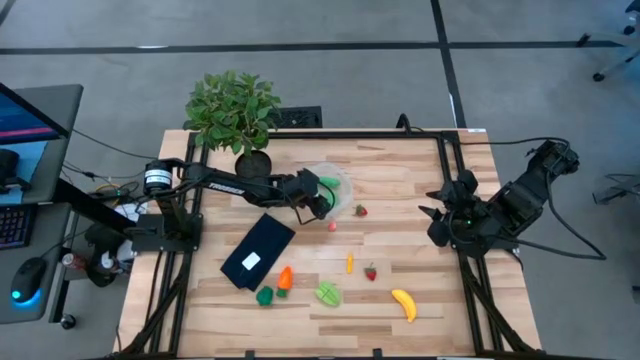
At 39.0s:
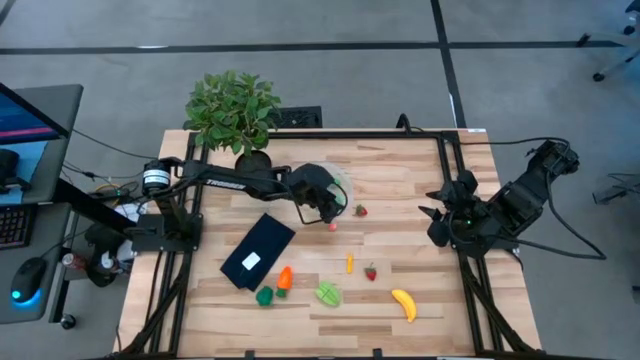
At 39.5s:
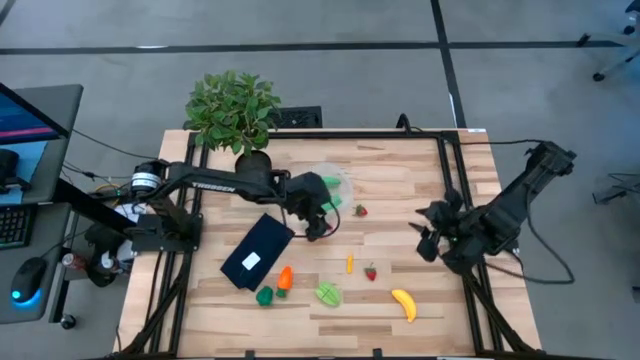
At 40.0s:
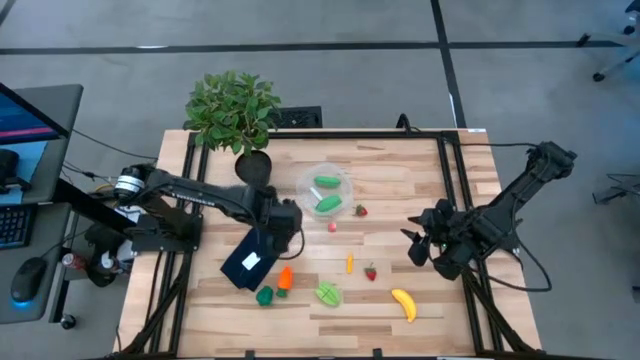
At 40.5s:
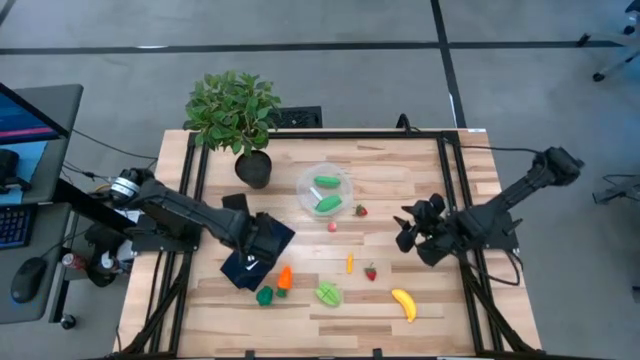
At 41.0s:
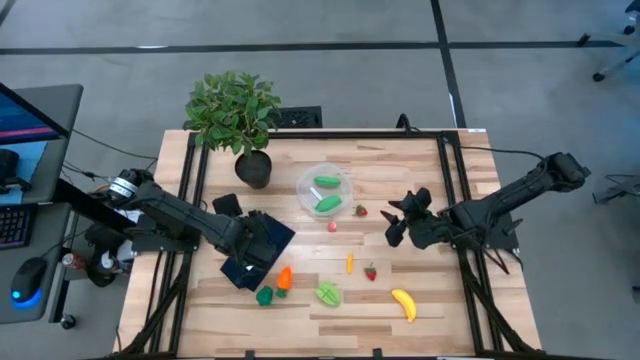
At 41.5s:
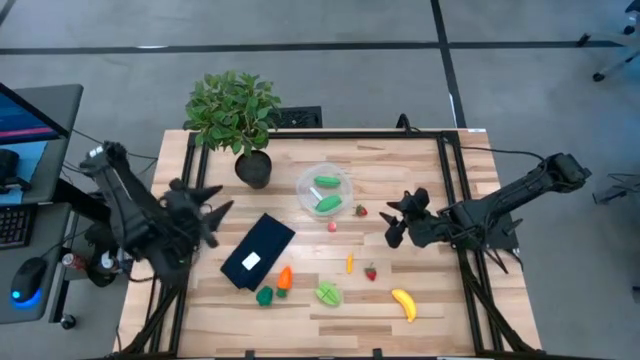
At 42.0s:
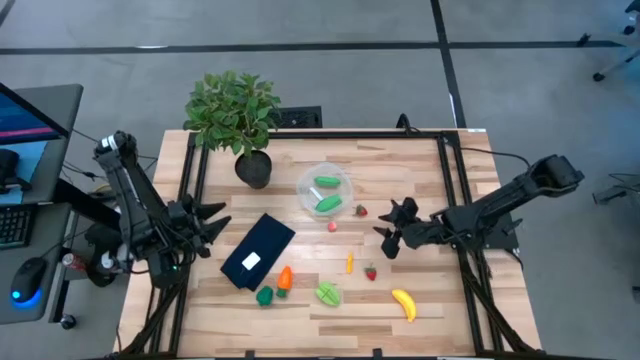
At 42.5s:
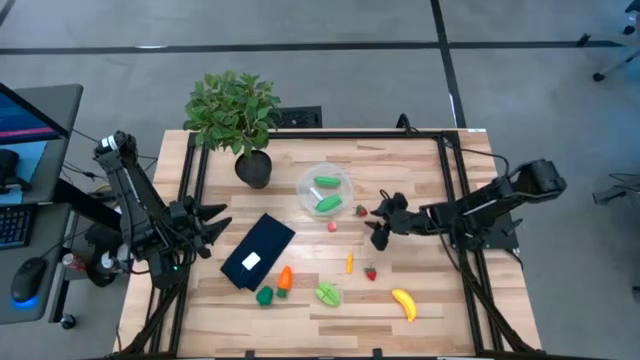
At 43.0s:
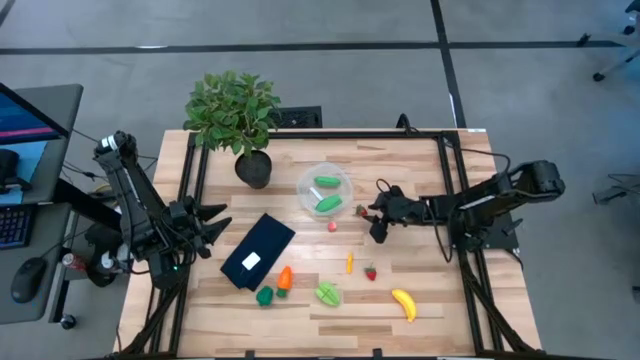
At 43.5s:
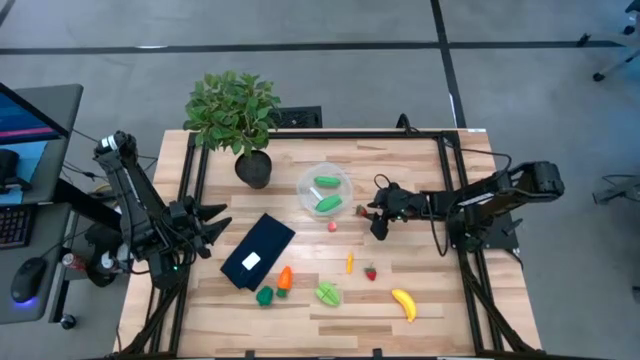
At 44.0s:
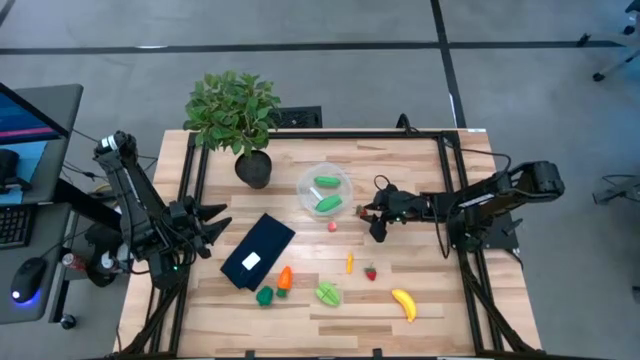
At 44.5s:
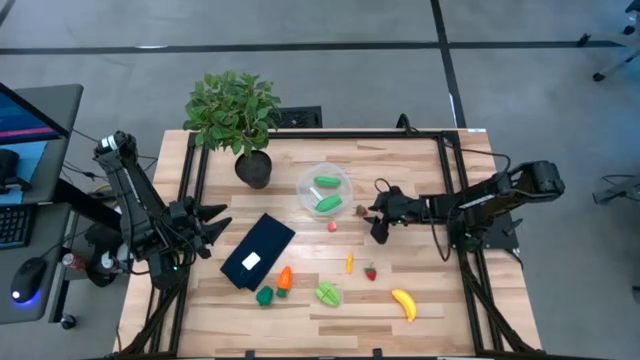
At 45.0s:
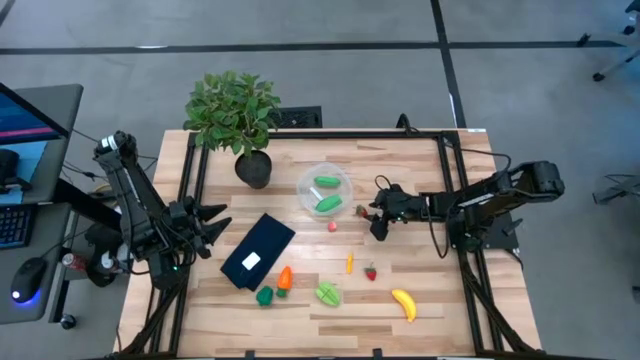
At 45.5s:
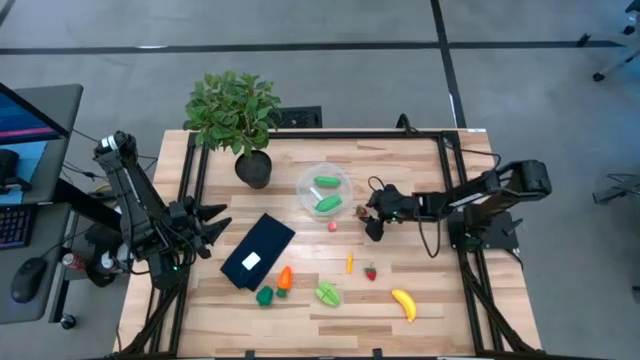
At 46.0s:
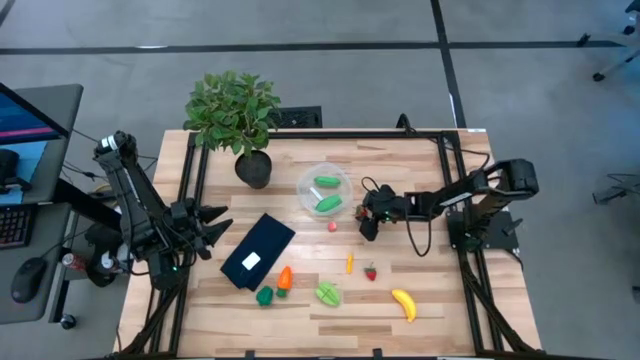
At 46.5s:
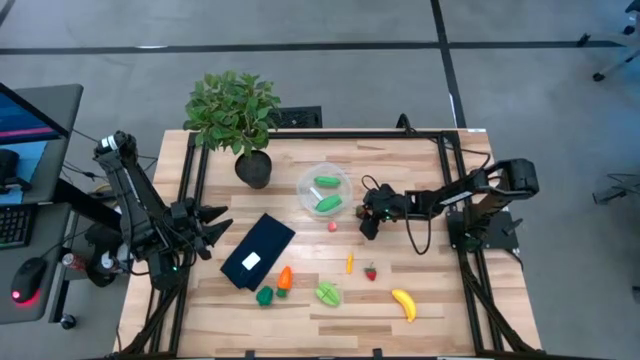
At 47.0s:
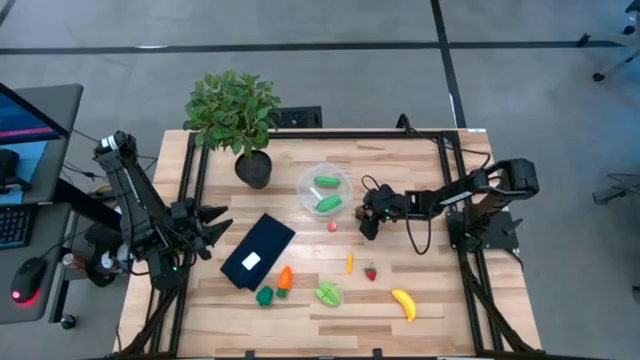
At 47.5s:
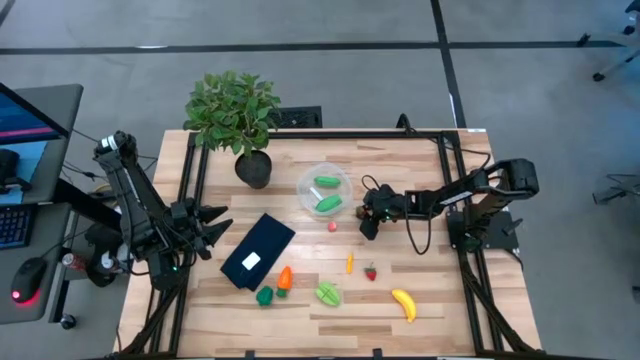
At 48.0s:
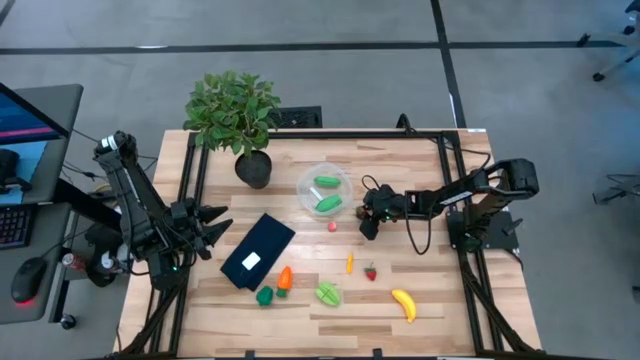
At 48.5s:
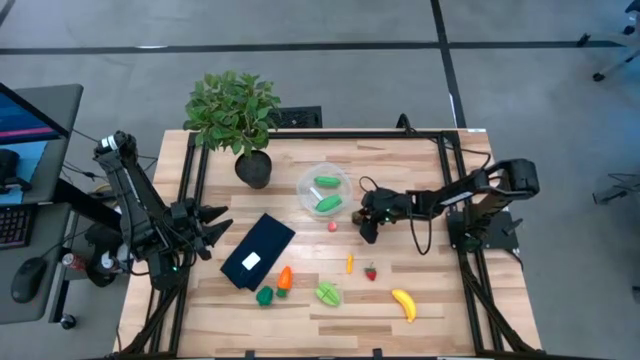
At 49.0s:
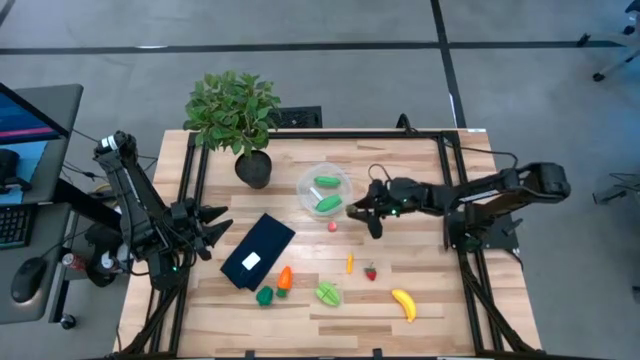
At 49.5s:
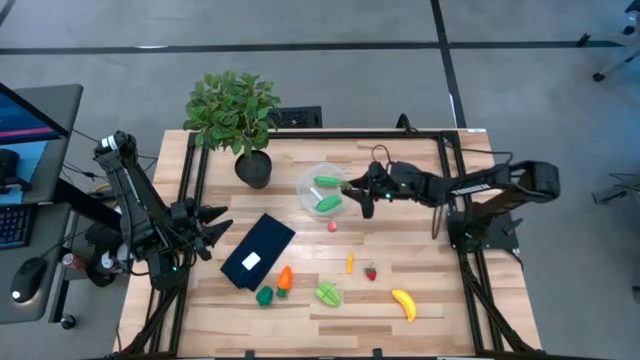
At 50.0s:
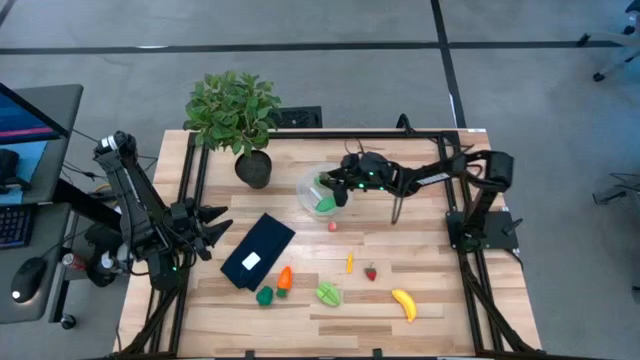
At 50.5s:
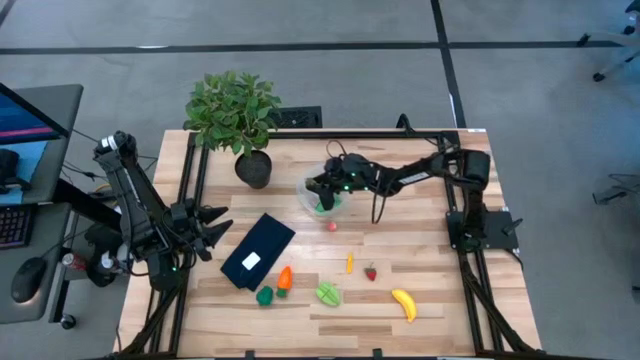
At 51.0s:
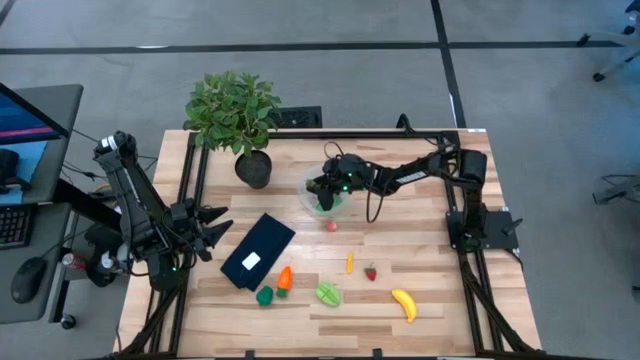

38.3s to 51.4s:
Task: Pick and placing Produce into tupperware
Put the top red strawberry into the transparent bin

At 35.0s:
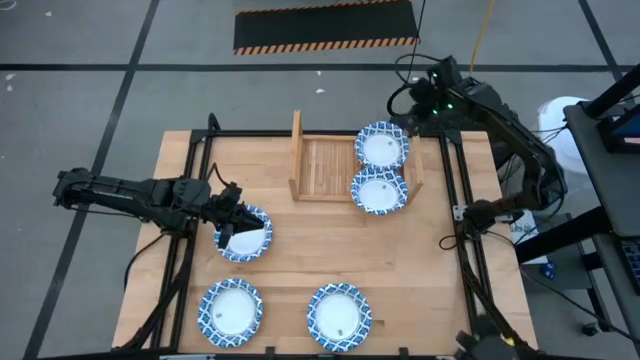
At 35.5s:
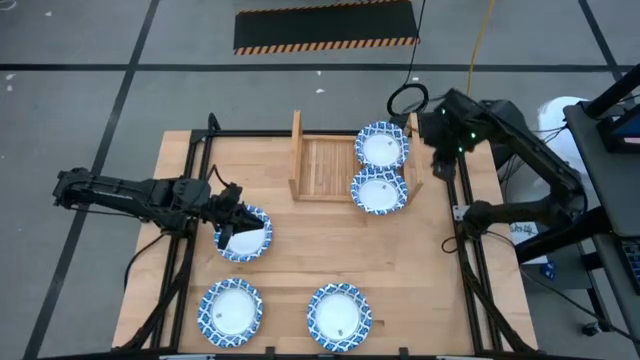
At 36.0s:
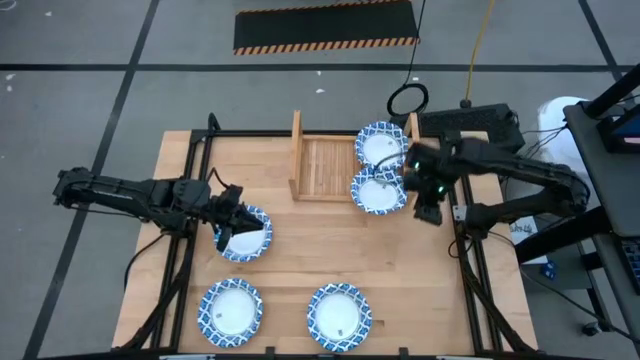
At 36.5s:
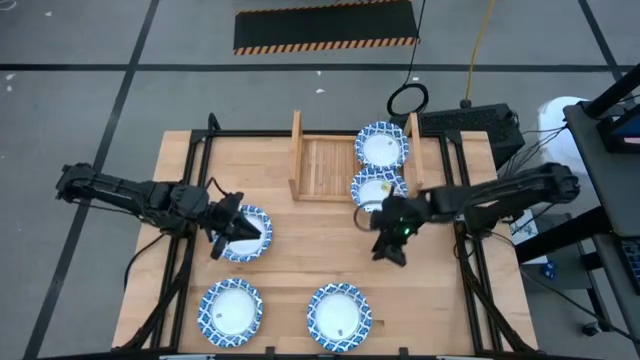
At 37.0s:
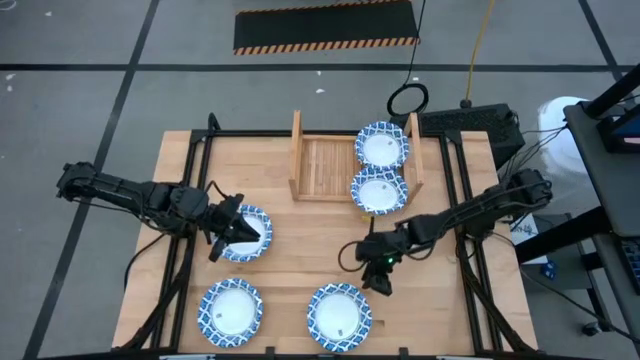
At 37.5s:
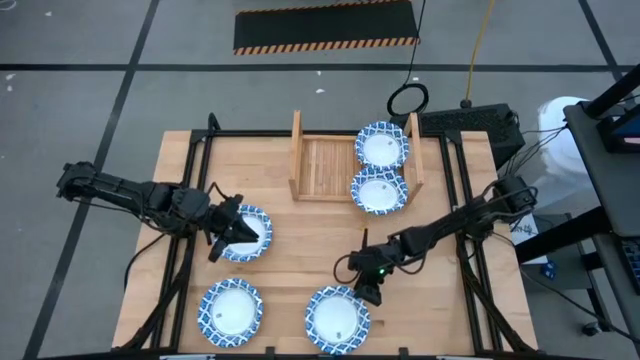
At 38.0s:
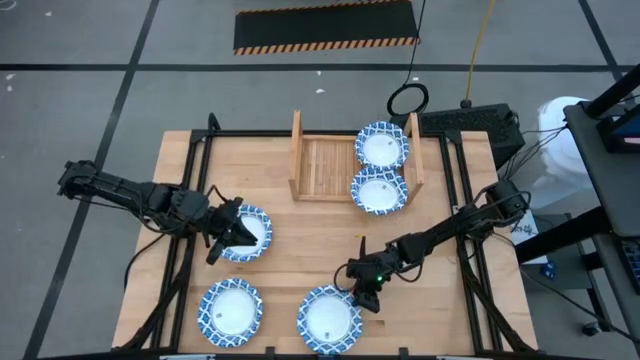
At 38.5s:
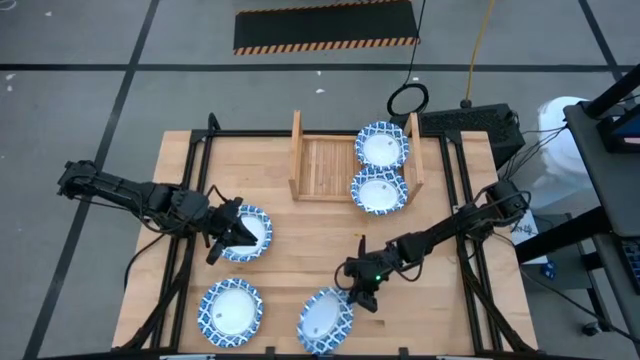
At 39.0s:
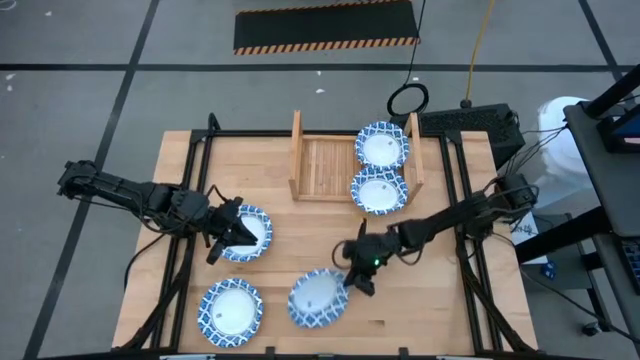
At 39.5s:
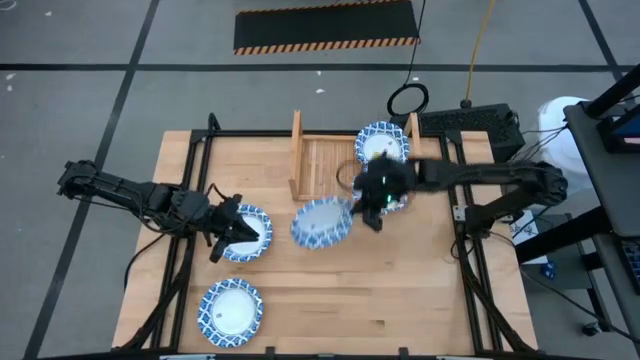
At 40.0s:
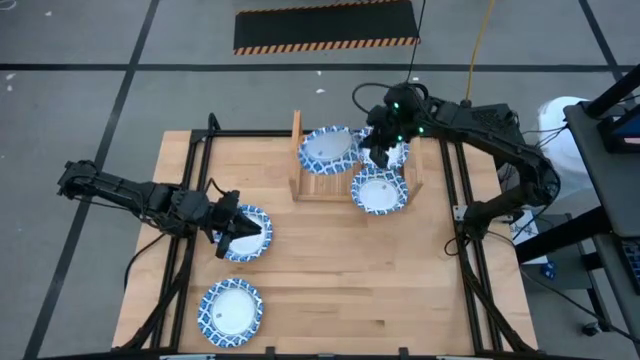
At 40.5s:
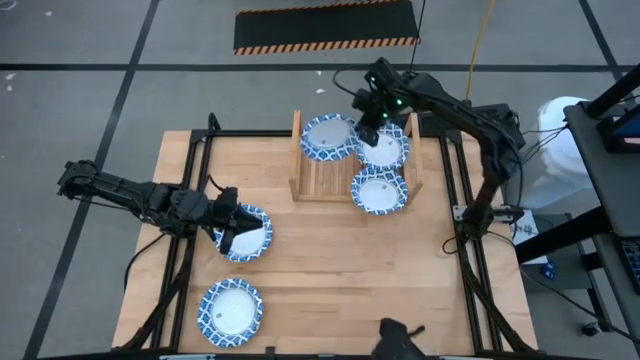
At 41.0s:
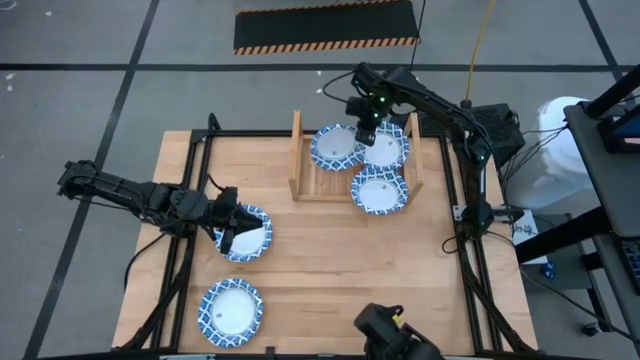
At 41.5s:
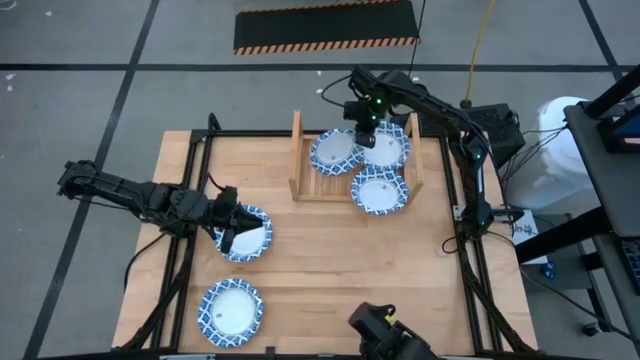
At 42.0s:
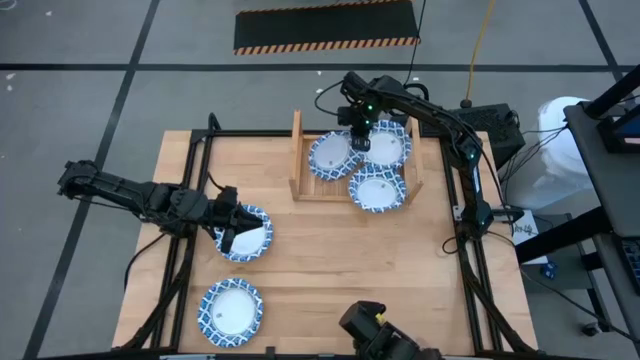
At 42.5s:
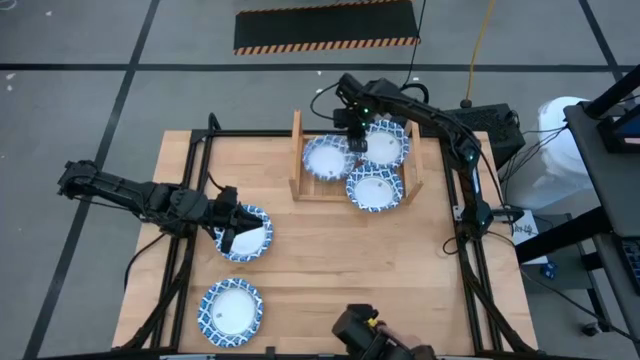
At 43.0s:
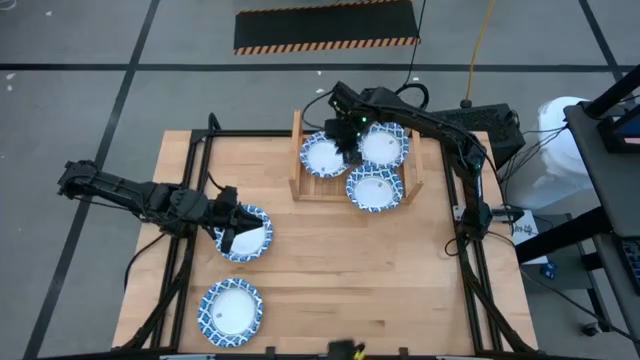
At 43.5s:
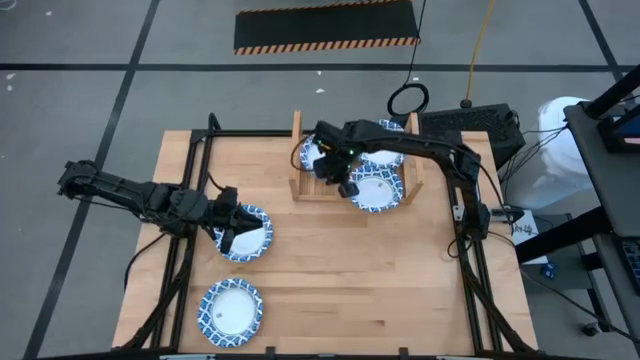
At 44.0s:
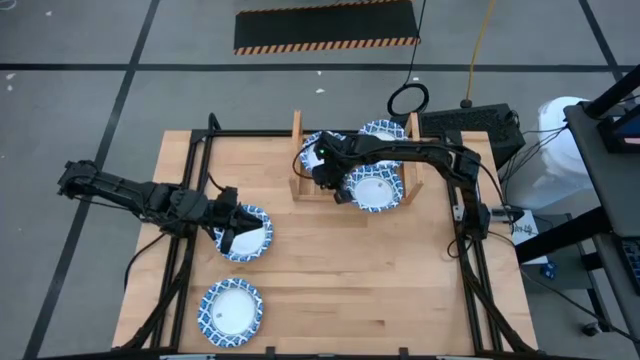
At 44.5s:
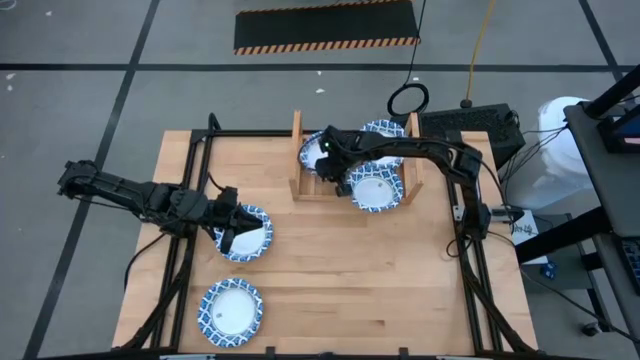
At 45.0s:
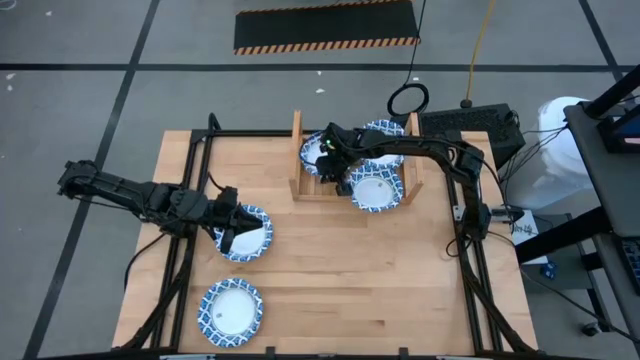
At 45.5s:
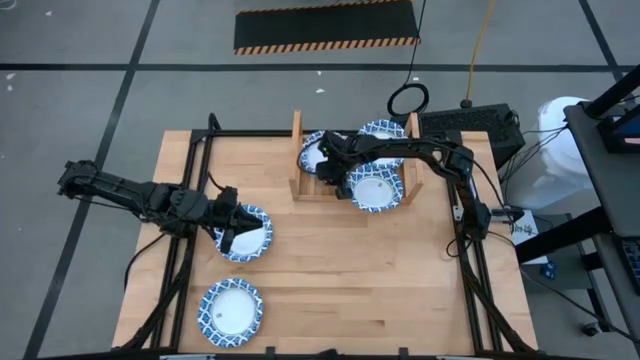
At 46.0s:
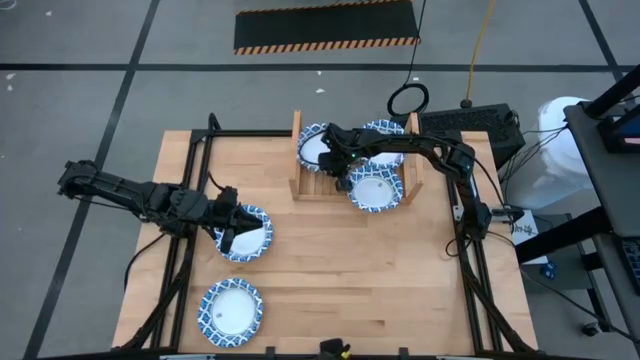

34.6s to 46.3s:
Task: Place and stack bowls onto a shelf
Put the blue patterned bowl on the shelf
